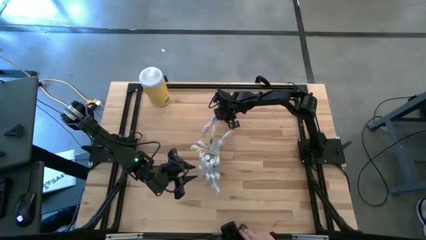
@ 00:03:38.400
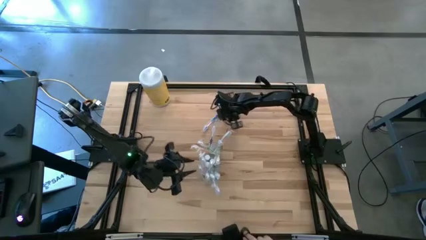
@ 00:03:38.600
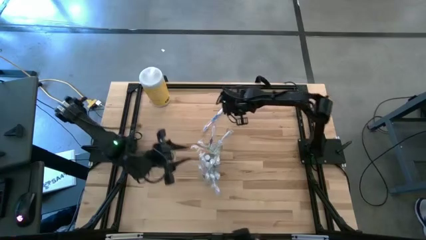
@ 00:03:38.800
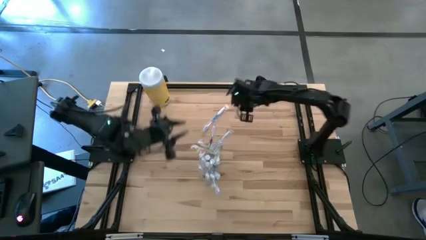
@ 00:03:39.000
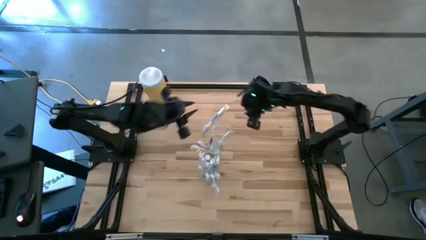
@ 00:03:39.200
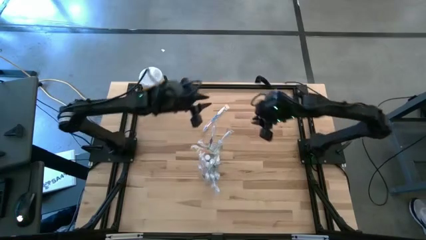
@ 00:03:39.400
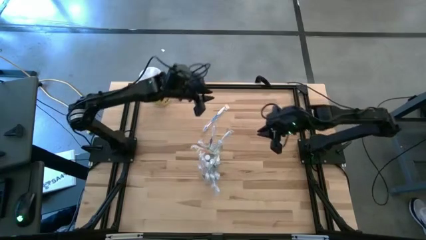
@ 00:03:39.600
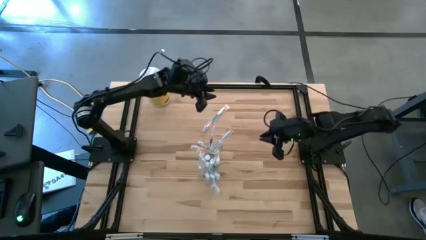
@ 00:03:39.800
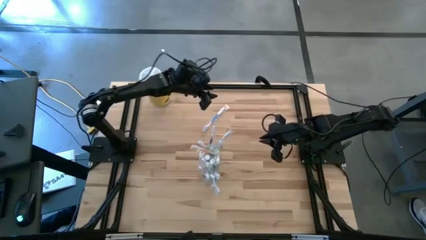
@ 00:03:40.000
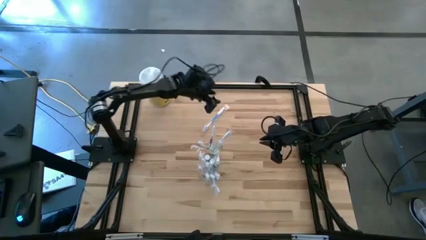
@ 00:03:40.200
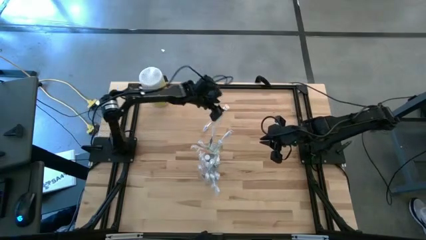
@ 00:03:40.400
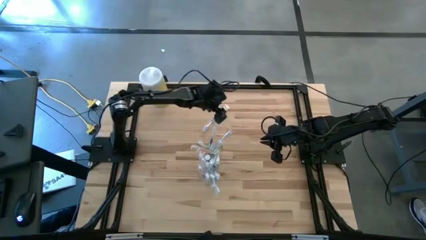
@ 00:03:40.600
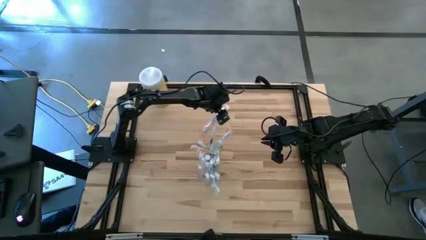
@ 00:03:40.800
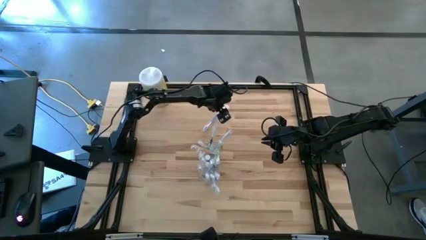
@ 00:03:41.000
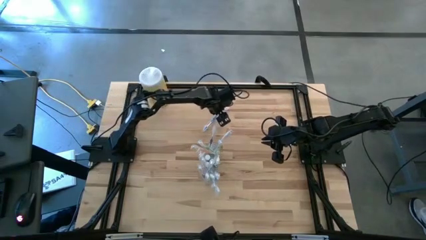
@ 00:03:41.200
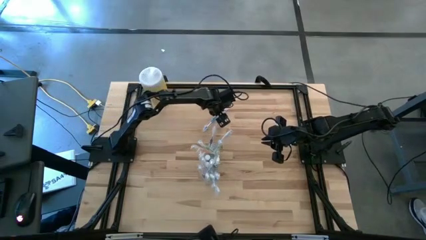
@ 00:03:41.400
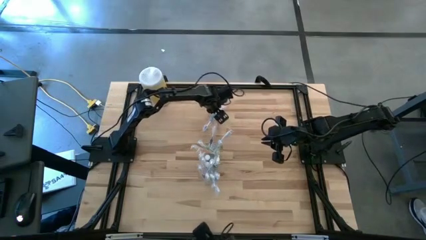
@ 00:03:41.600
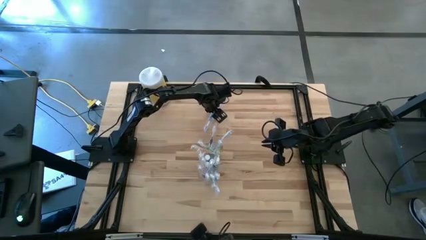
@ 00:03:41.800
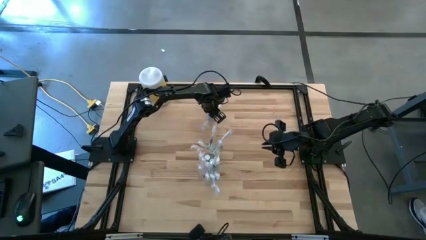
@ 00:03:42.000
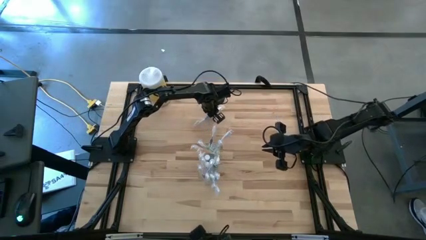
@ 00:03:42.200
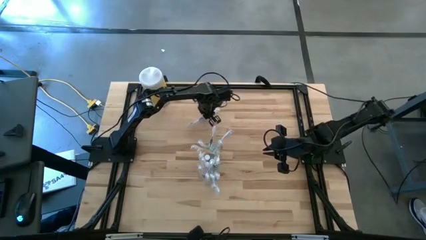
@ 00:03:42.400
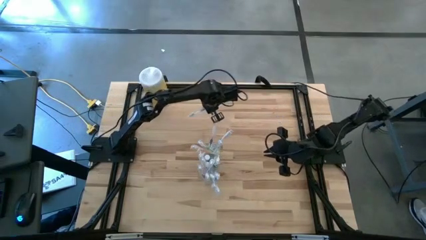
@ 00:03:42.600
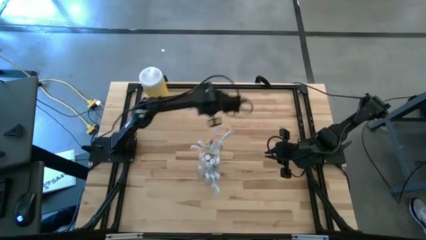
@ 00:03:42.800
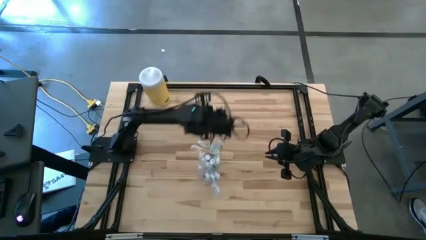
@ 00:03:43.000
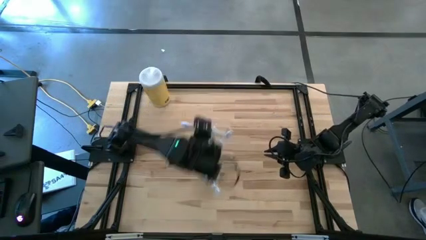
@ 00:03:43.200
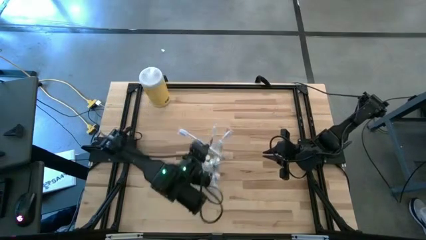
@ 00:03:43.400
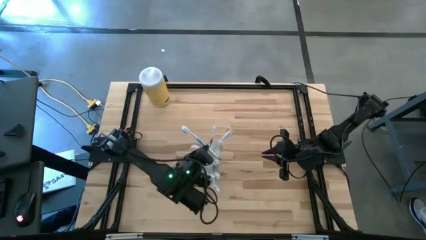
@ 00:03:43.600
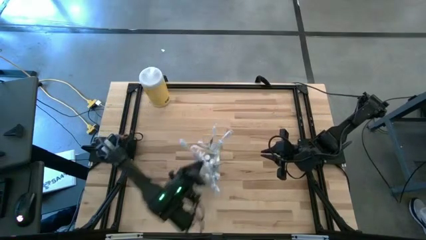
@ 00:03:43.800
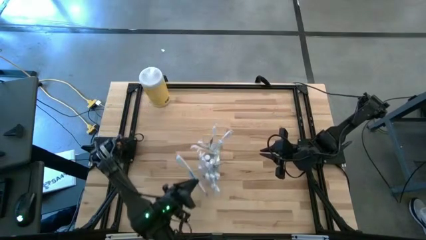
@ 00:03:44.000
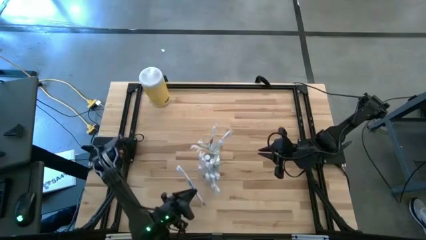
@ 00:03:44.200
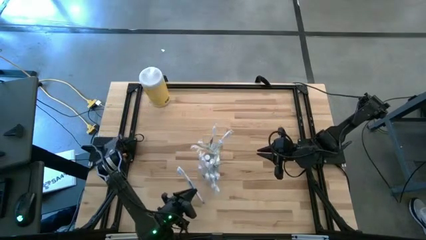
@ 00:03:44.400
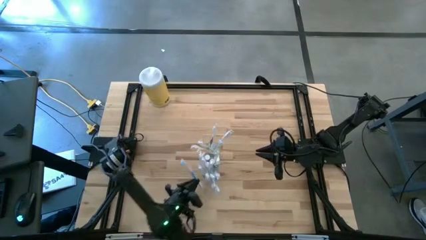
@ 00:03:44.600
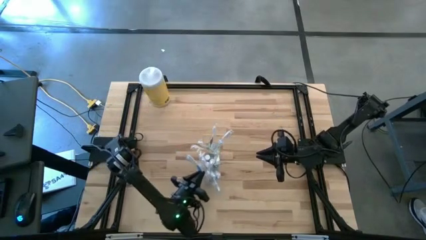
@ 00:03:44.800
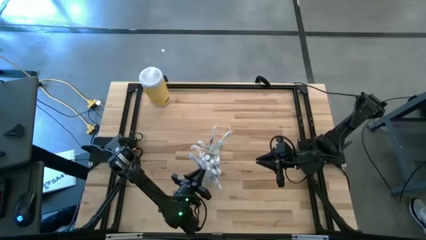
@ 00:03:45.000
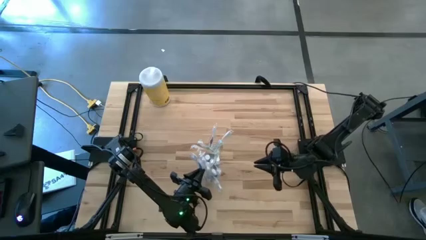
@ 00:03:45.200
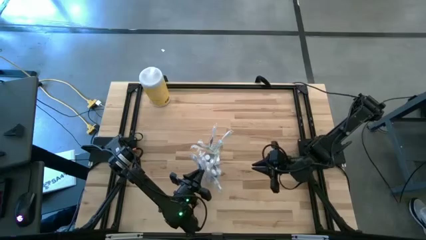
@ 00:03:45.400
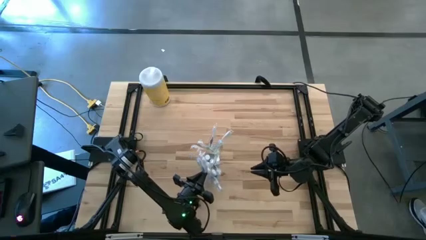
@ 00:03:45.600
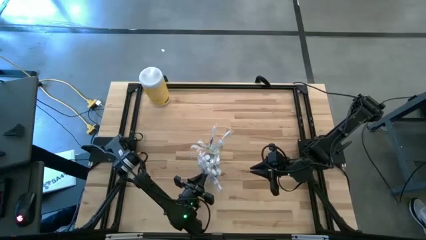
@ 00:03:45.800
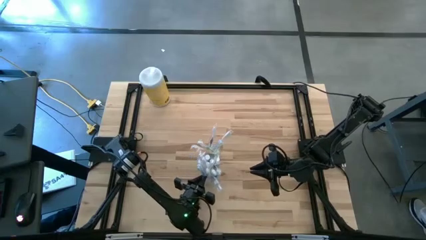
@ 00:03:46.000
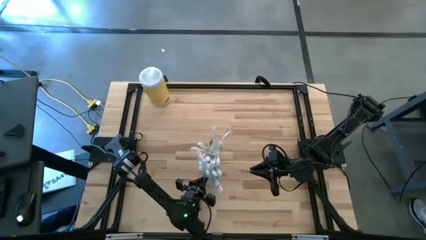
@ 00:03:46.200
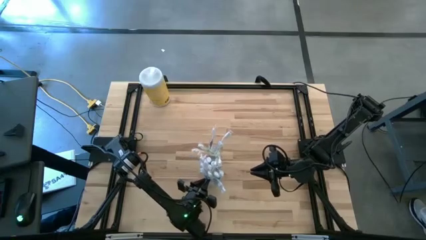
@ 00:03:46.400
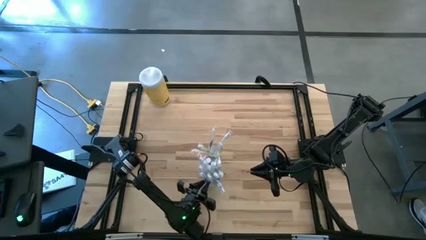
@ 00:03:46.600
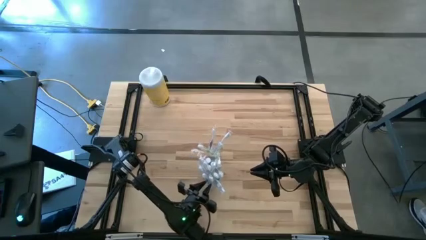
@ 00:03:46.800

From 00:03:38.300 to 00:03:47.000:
Task: Pick & Place toothbrushing station
Put the blue toothbrush into the transparent organizer

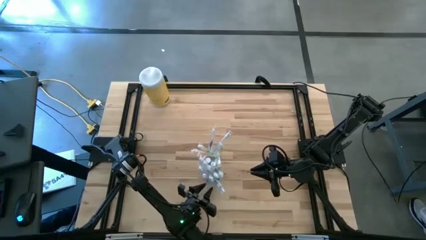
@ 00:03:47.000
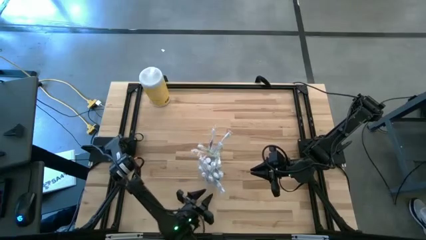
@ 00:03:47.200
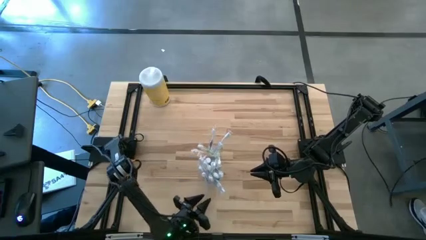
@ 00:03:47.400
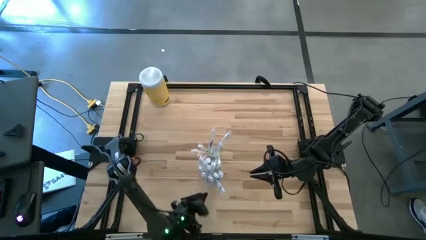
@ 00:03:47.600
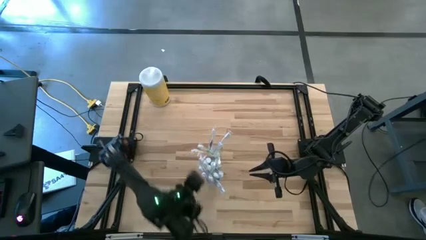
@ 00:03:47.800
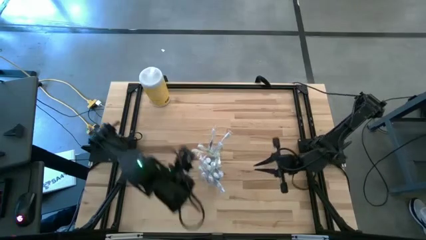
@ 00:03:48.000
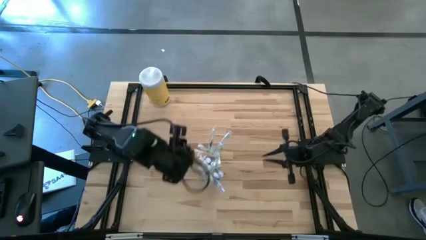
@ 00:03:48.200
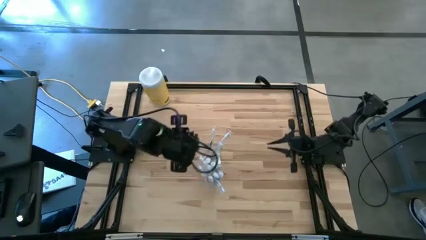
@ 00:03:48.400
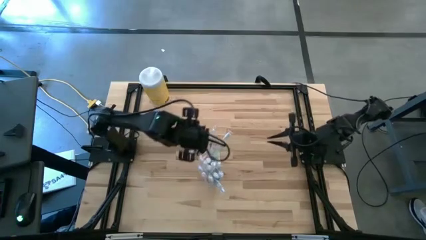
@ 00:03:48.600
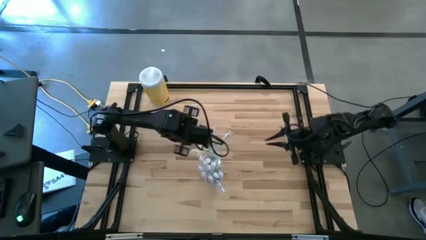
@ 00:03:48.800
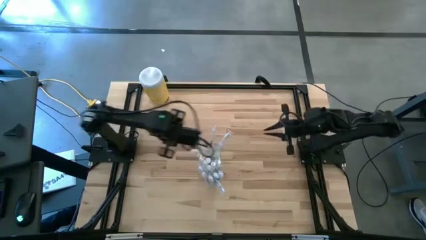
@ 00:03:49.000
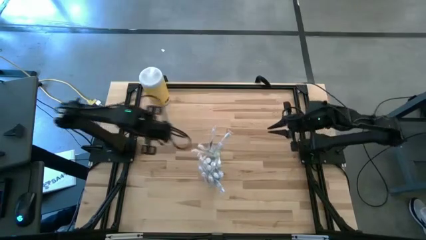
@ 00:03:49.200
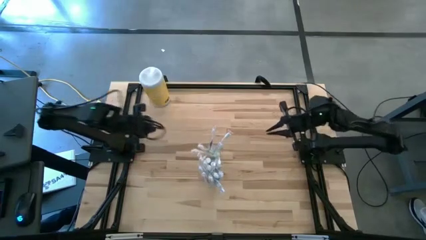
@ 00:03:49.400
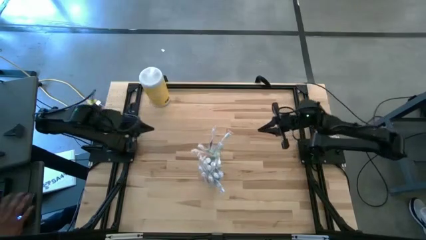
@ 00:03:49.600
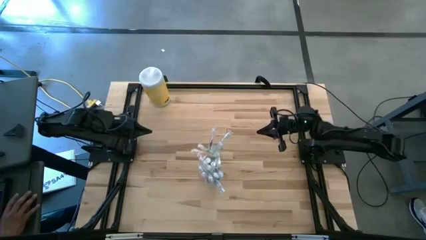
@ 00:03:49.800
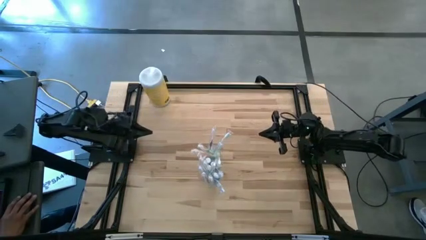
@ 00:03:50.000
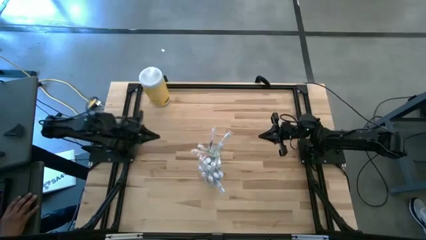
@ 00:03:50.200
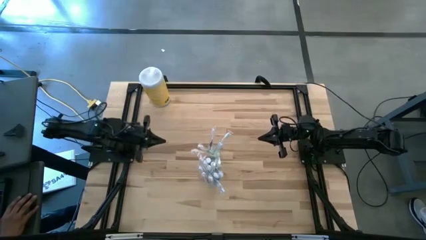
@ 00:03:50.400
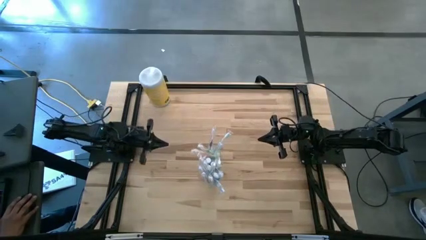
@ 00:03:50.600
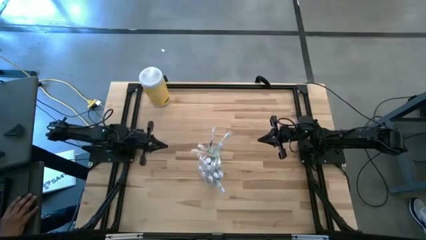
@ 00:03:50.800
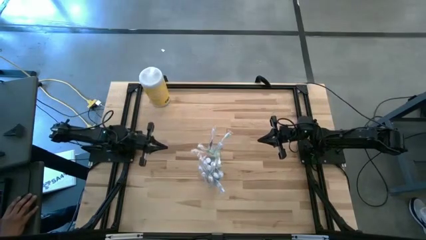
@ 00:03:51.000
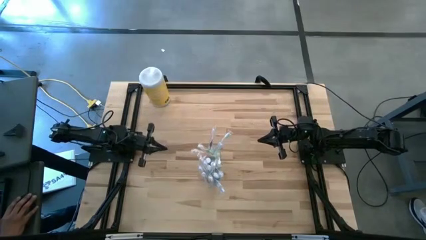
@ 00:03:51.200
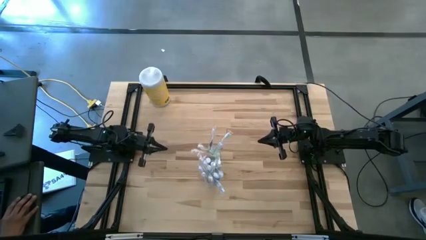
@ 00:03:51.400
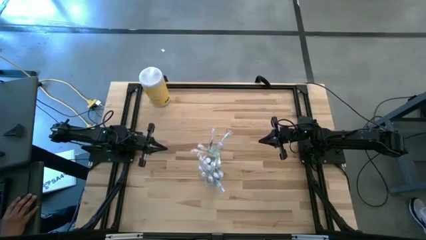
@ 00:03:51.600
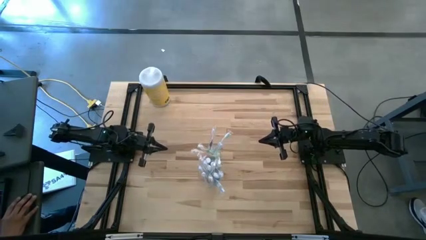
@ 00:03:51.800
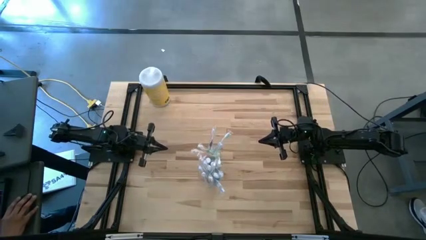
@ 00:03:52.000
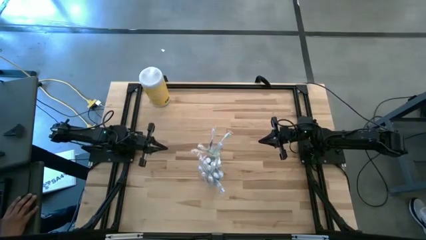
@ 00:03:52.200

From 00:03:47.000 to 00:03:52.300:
Return to Home Position
